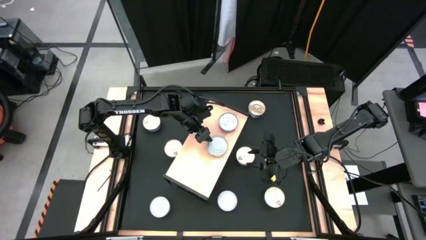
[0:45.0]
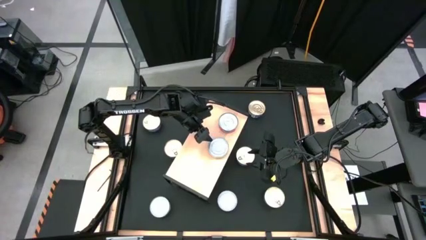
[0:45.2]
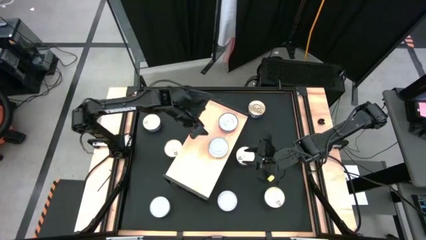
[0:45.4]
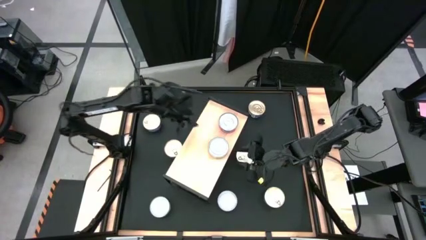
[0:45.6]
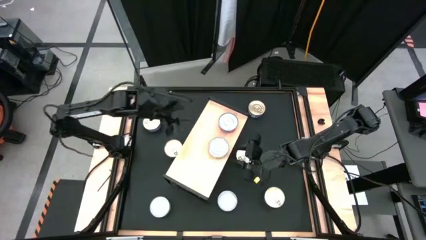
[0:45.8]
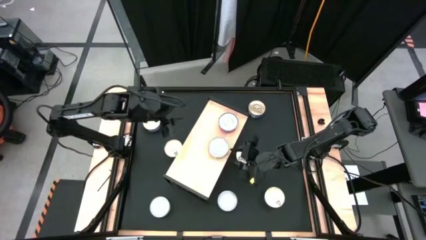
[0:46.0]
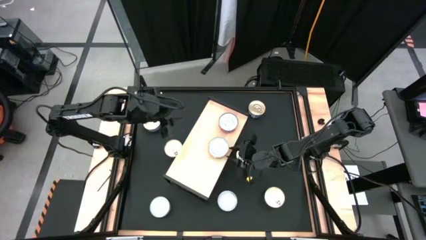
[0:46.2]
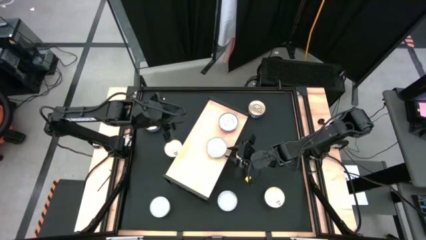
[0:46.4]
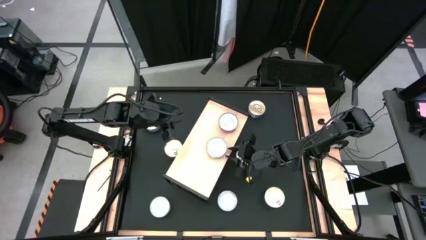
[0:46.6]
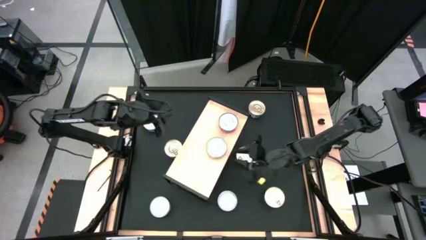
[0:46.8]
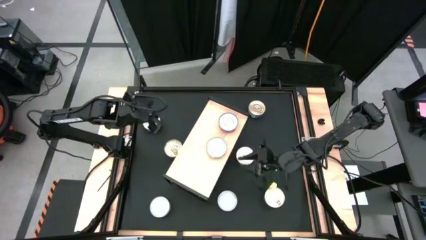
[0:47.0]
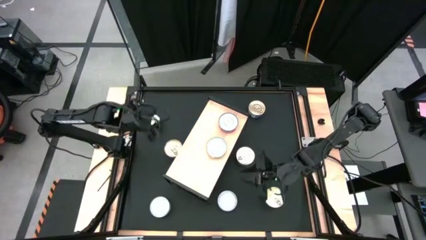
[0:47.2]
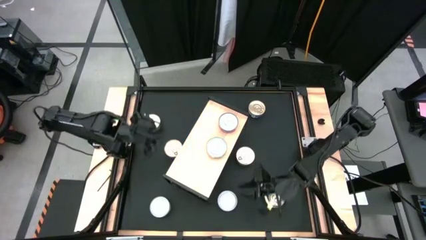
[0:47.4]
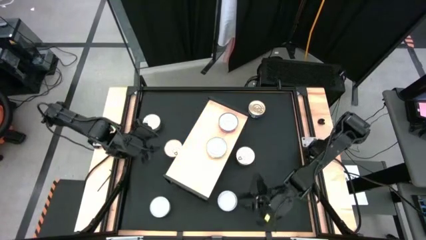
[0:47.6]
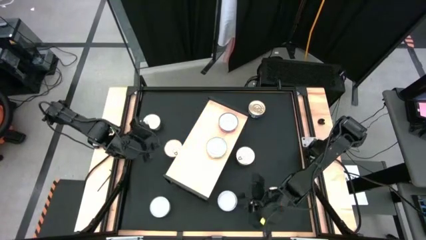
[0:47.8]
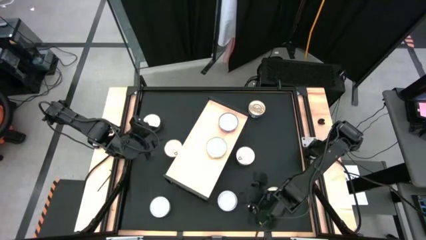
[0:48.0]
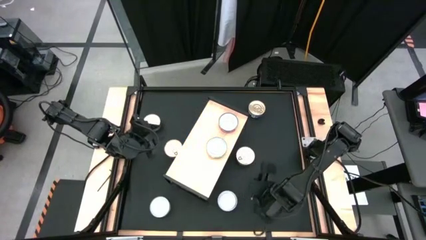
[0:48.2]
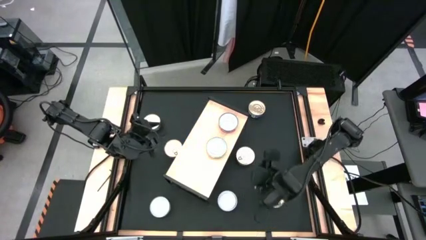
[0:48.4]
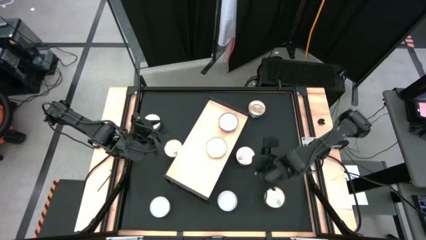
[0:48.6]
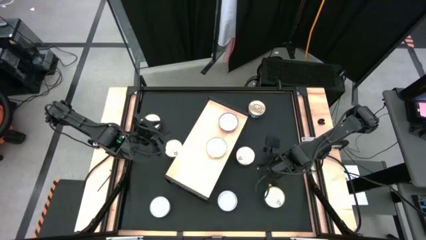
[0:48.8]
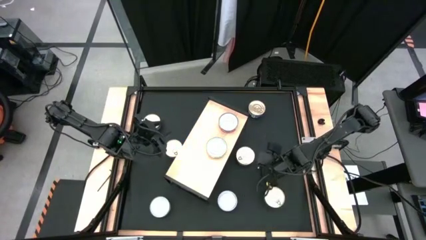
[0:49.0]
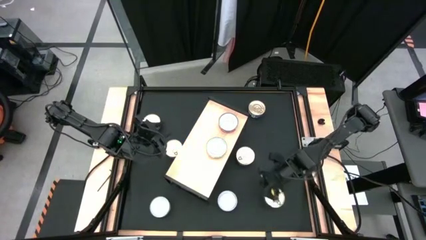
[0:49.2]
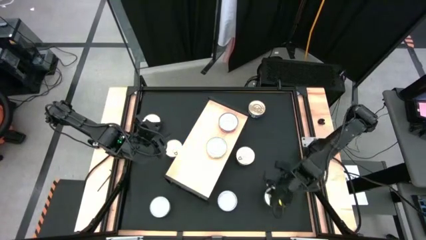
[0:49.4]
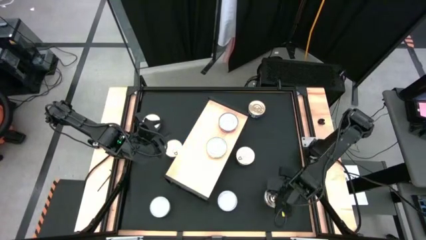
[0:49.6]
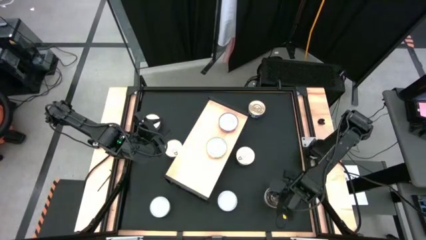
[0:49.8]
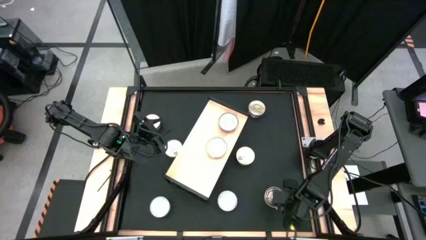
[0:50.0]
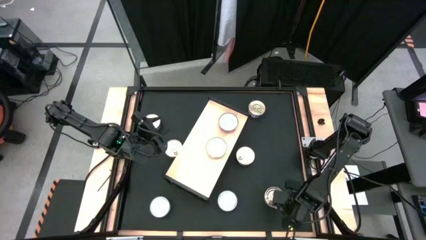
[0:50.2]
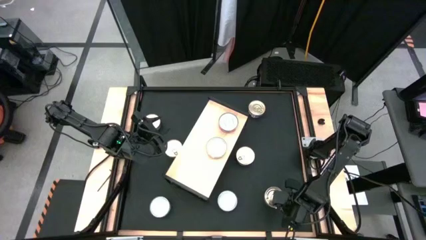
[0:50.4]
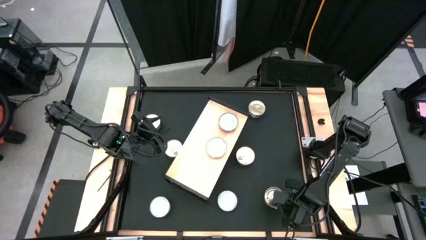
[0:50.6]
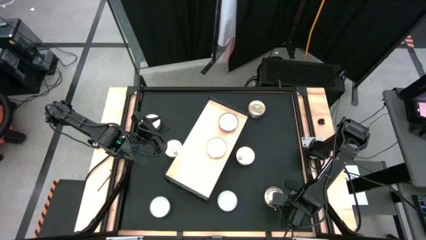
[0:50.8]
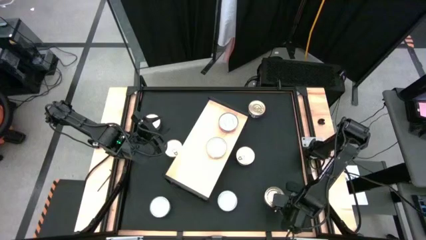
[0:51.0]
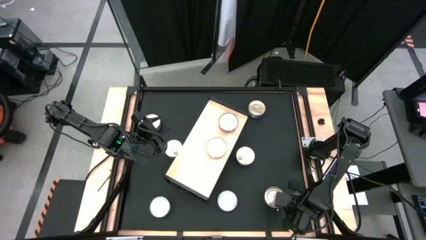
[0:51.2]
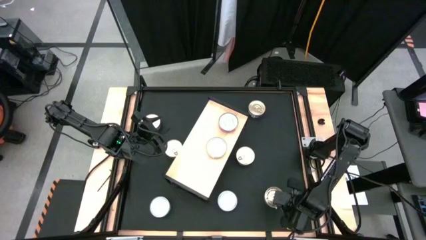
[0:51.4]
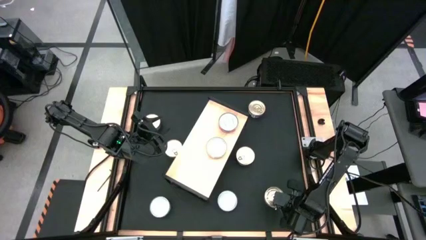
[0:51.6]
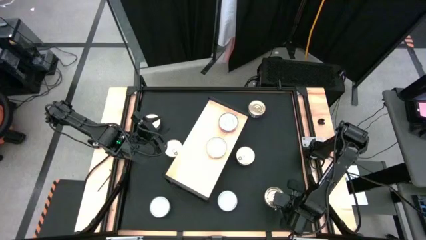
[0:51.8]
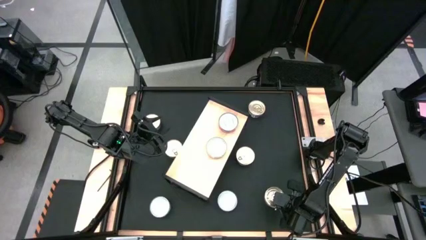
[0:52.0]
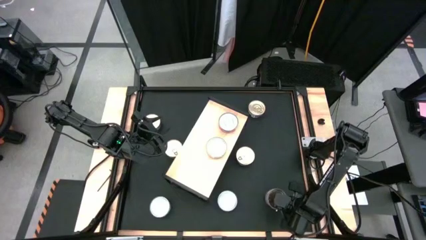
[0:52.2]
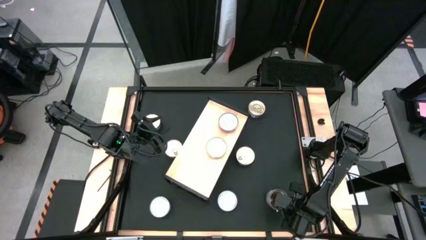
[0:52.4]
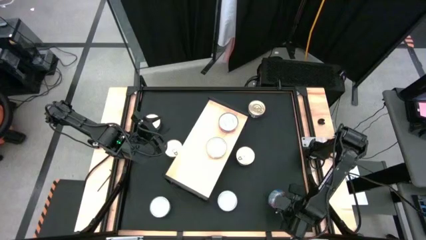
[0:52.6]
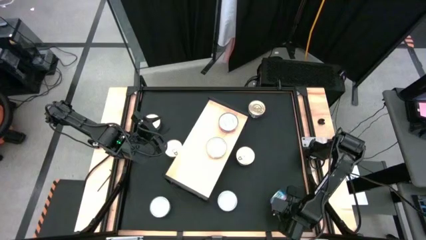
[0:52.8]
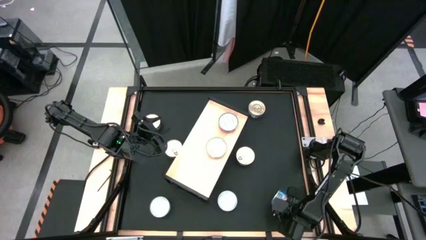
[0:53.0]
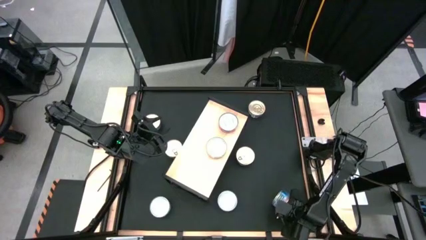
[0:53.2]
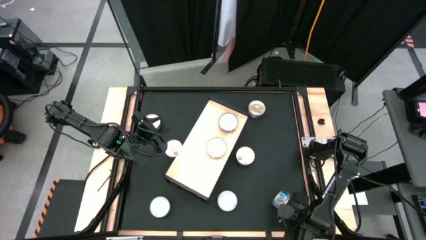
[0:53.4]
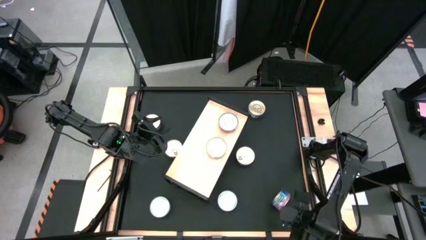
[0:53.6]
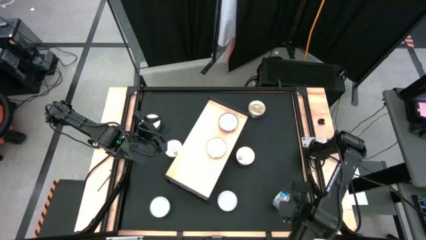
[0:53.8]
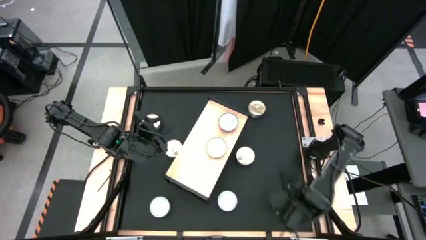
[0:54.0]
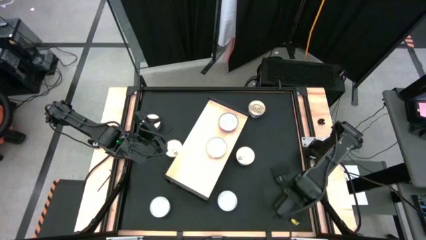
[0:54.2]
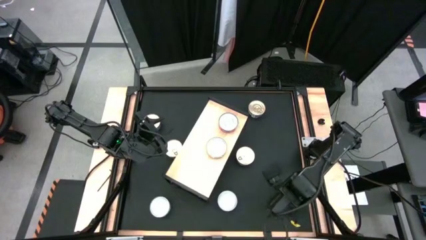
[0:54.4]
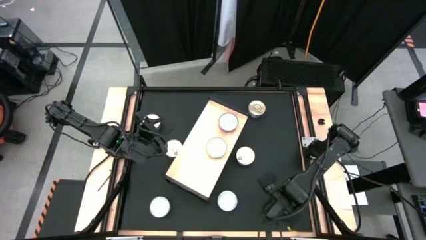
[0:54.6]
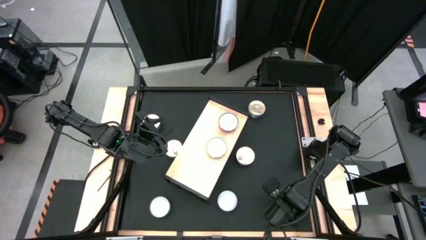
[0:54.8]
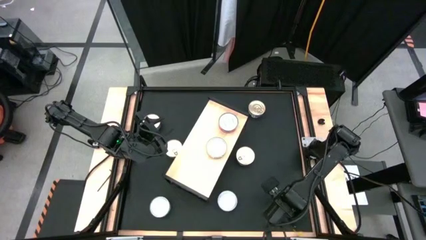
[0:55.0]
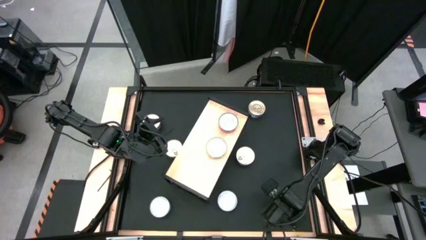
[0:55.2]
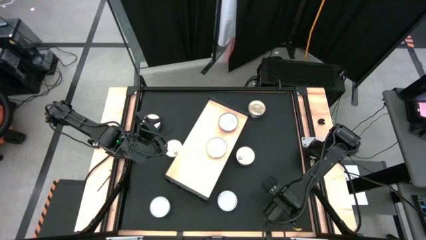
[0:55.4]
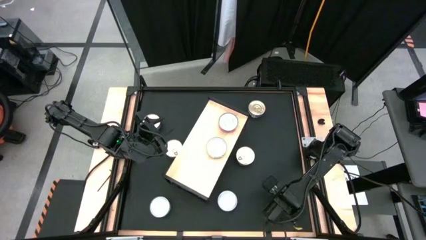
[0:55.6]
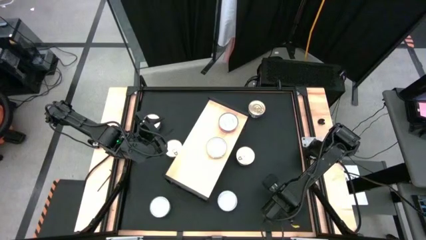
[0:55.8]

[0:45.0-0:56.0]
Task: Stack canned seafood by type on shelf
Put the blue tuna can on the shelf
